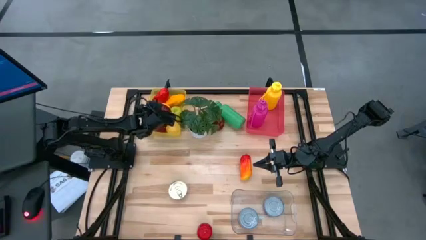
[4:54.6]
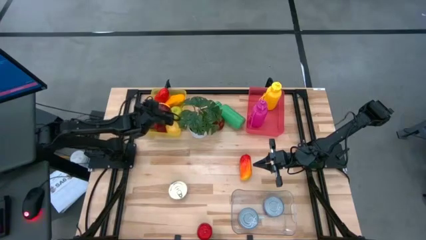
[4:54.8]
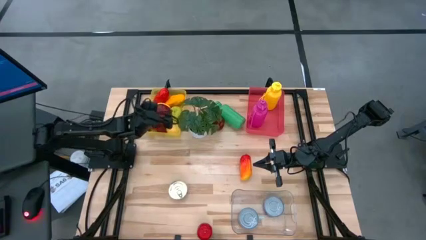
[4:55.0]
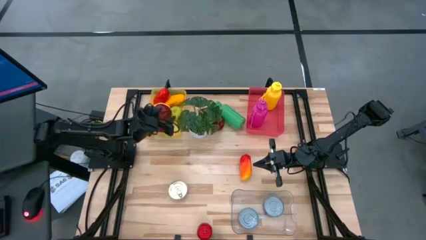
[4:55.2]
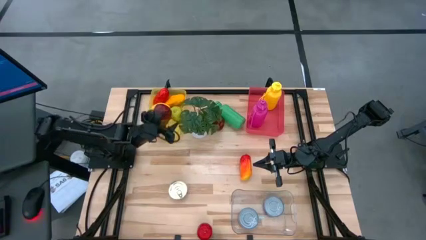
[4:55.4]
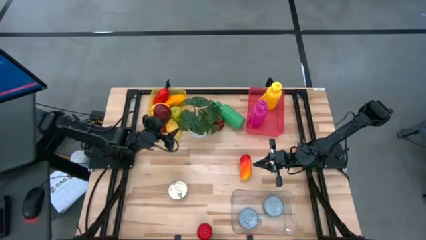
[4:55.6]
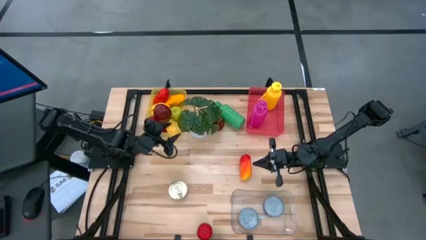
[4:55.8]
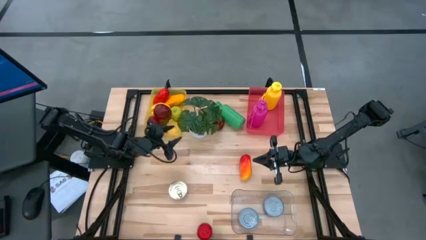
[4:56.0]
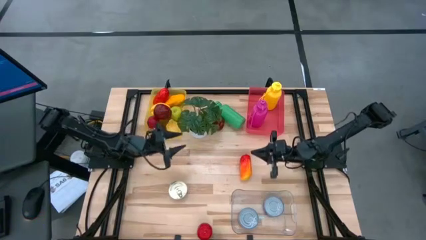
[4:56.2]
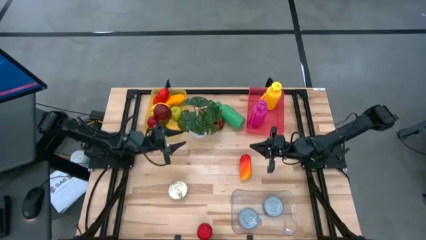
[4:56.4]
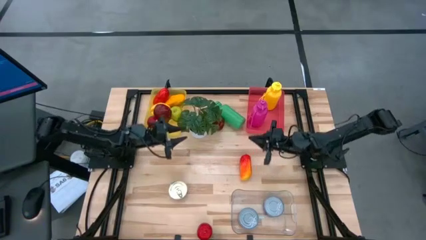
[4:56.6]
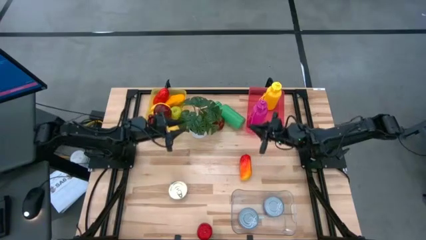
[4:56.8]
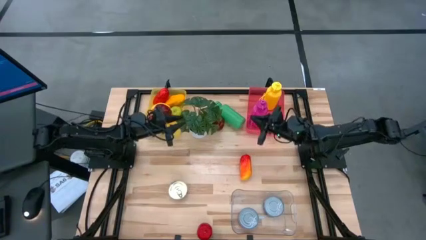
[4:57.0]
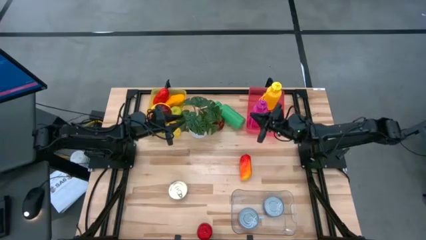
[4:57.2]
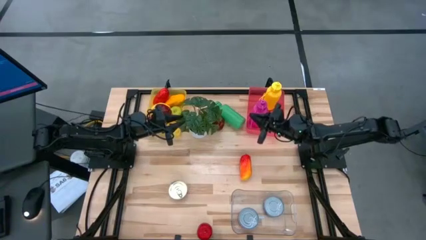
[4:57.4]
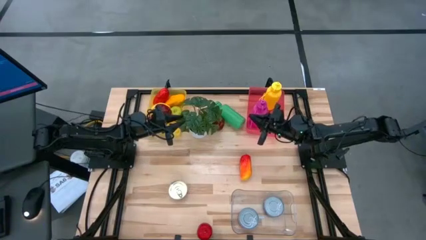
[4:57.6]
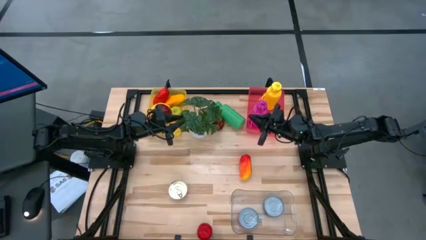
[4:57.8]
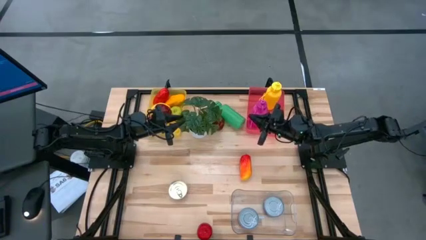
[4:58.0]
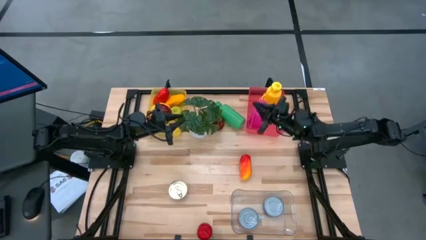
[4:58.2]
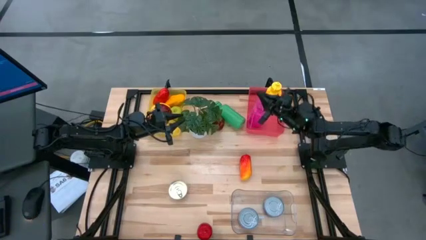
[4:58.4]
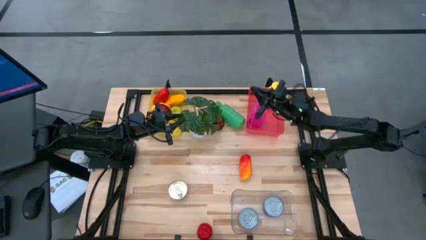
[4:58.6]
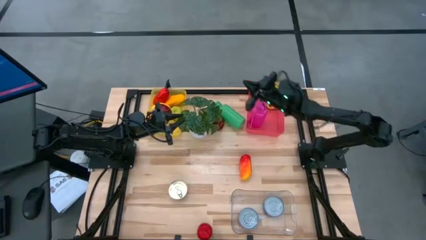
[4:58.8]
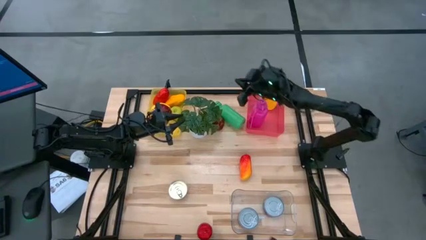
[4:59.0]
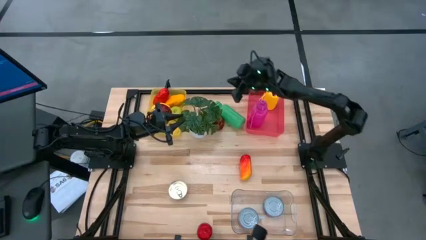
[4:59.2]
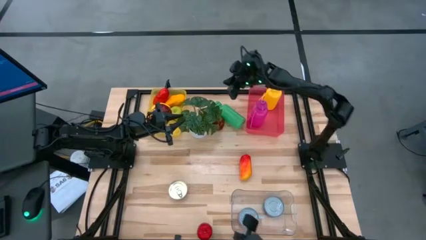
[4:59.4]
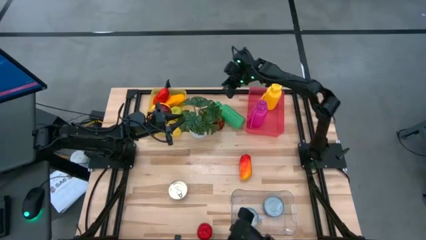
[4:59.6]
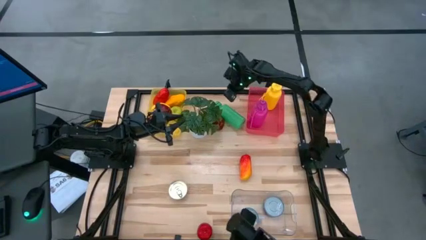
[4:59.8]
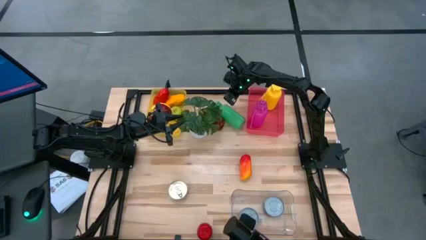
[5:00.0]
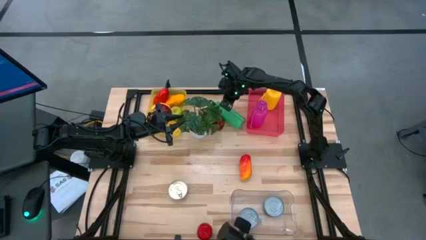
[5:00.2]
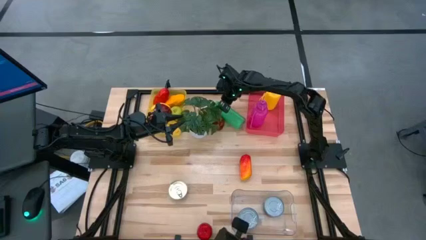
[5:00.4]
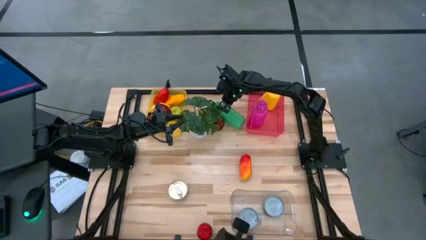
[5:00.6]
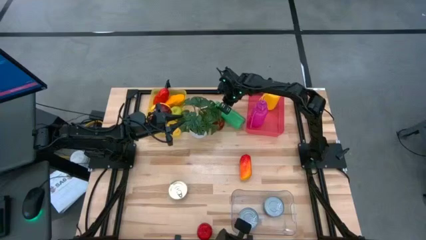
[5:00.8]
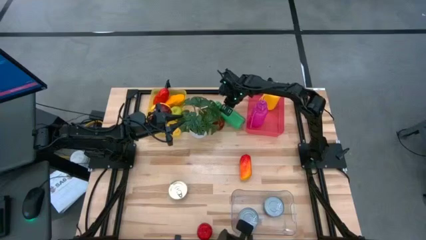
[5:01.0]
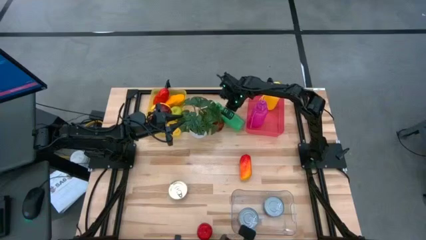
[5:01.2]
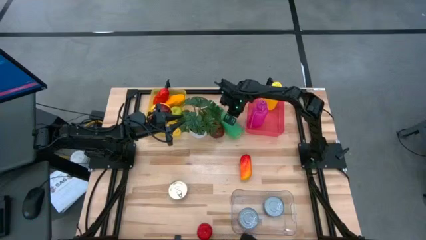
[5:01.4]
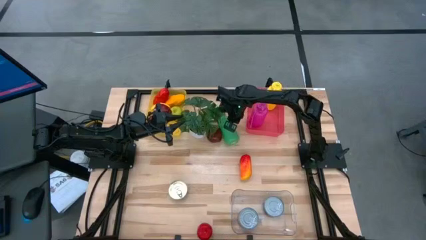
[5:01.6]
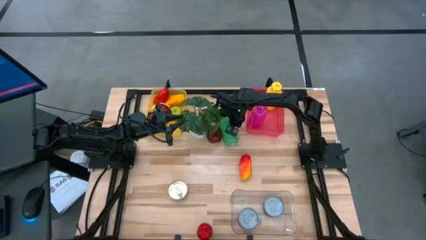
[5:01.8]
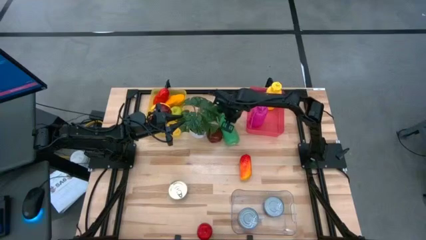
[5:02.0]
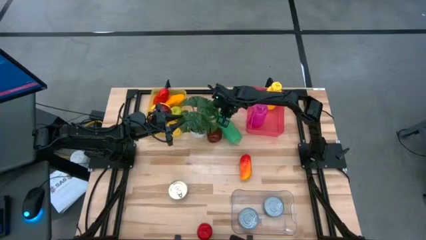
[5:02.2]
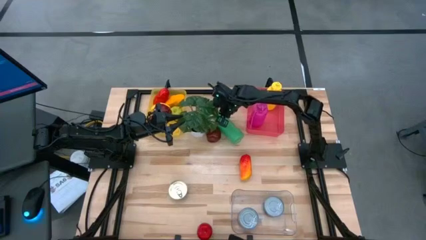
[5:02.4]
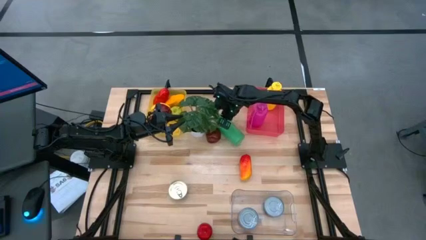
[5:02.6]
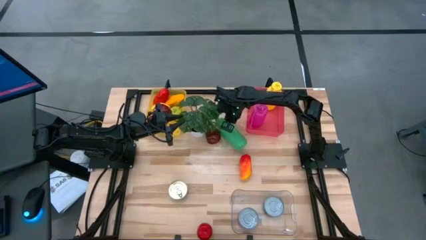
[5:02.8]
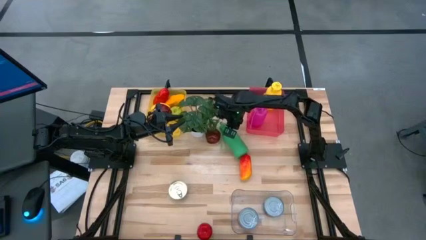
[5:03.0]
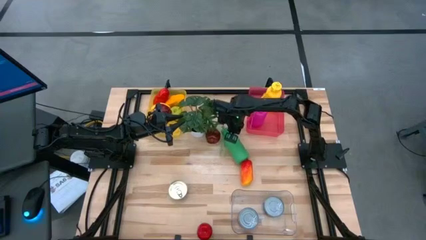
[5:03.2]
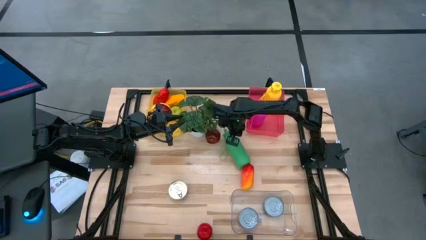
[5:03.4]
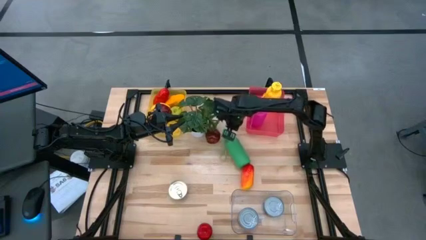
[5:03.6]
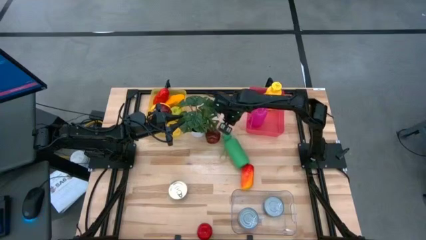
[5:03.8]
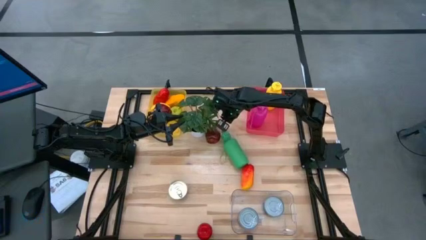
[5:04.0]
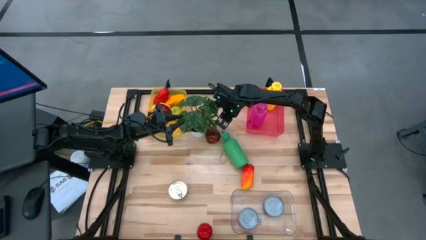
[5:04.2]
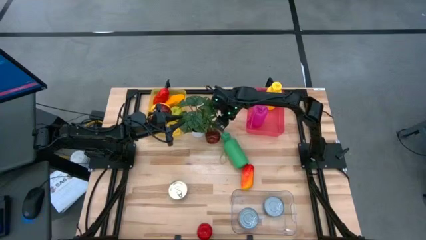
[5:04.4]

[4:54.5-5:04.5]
Task: Pick & Place Food Item
Put the green water bottle into the pink bin

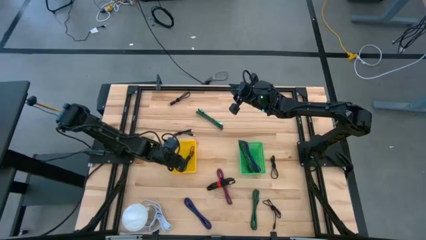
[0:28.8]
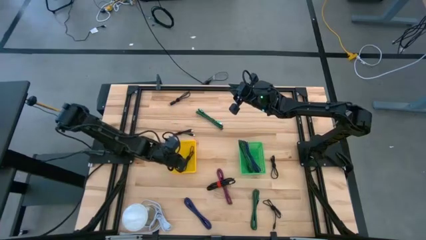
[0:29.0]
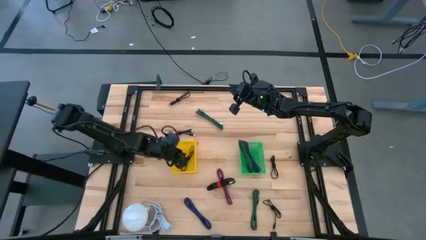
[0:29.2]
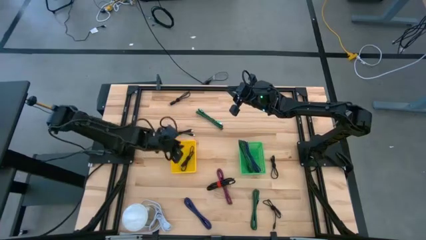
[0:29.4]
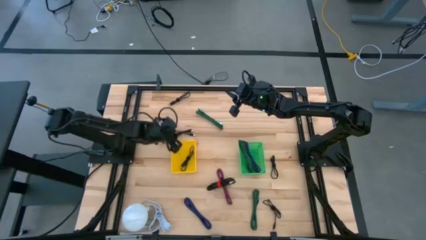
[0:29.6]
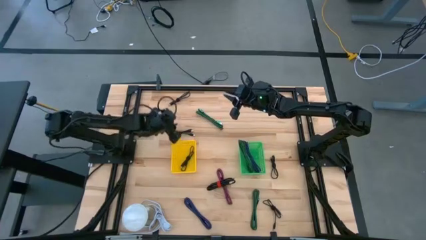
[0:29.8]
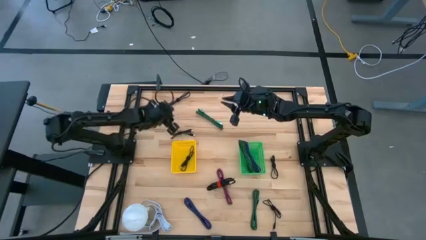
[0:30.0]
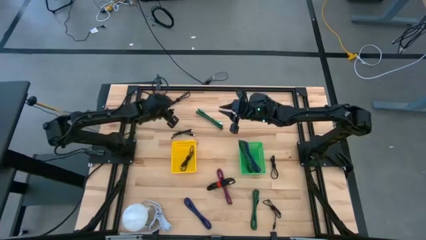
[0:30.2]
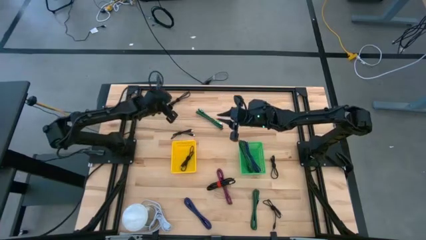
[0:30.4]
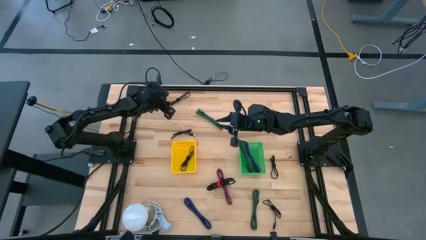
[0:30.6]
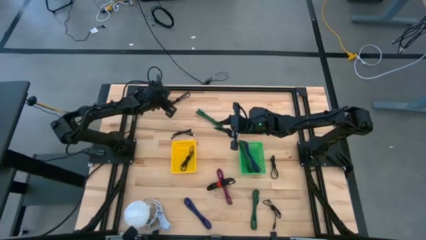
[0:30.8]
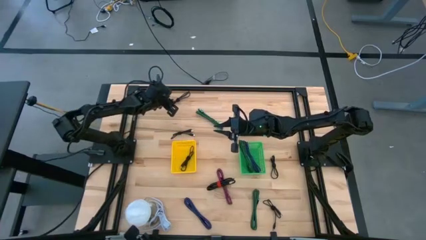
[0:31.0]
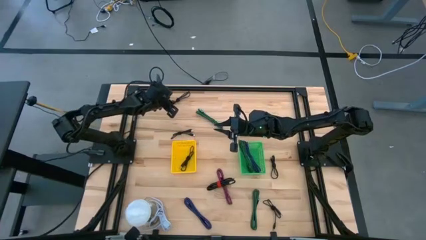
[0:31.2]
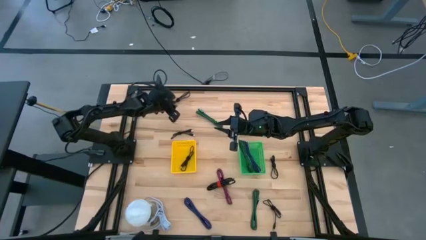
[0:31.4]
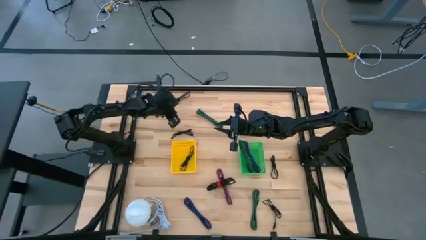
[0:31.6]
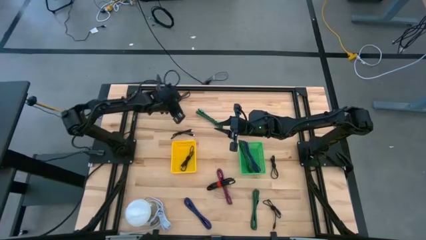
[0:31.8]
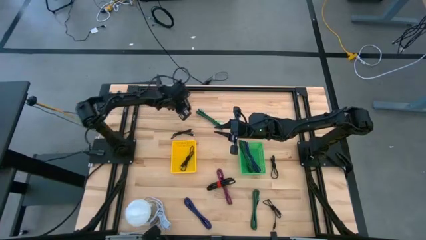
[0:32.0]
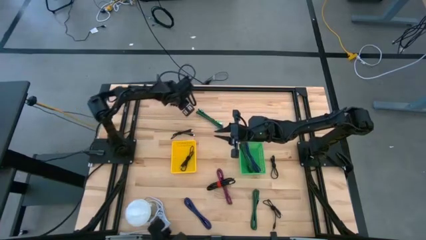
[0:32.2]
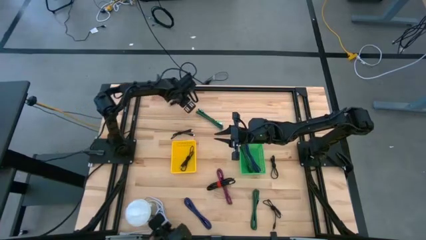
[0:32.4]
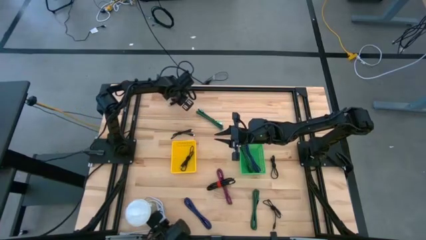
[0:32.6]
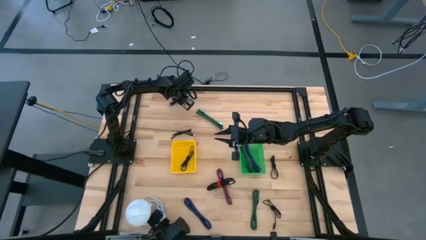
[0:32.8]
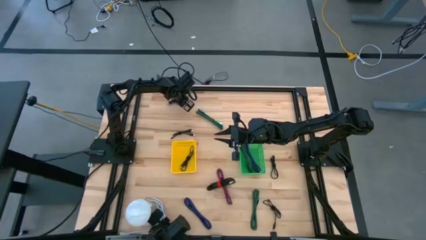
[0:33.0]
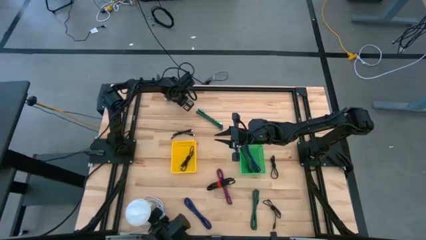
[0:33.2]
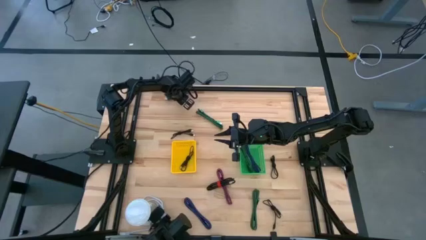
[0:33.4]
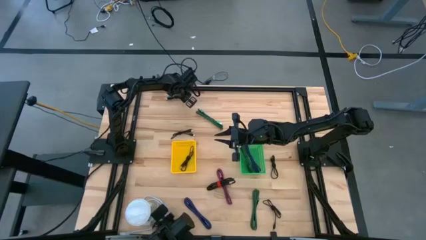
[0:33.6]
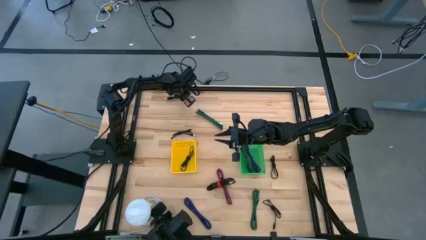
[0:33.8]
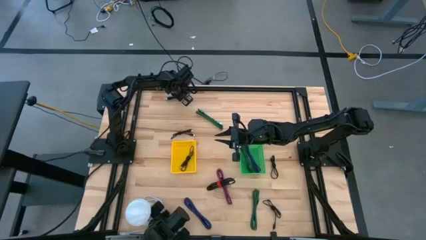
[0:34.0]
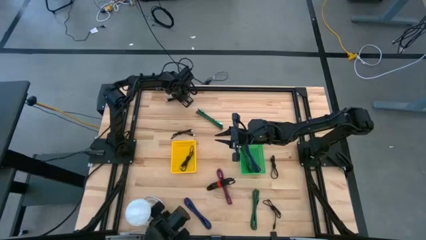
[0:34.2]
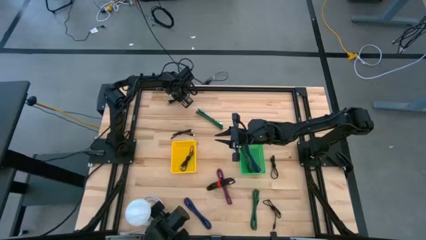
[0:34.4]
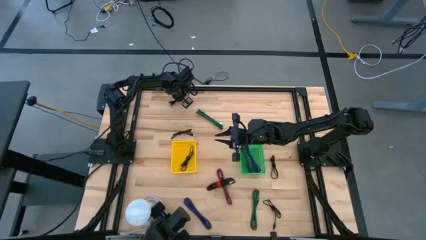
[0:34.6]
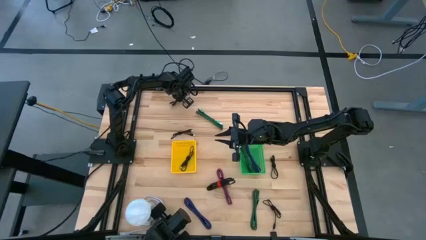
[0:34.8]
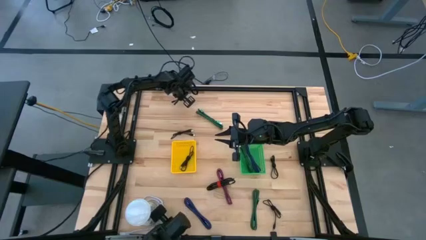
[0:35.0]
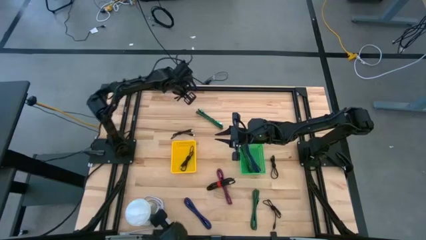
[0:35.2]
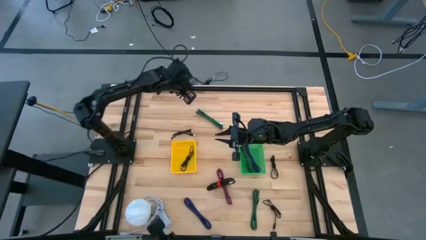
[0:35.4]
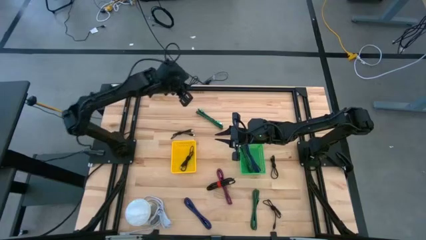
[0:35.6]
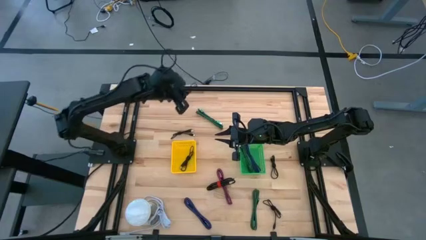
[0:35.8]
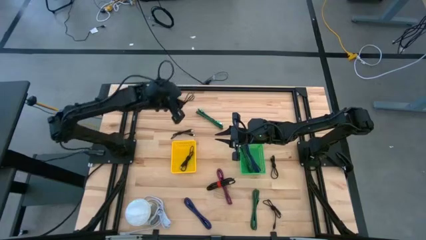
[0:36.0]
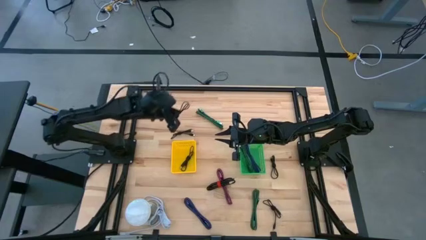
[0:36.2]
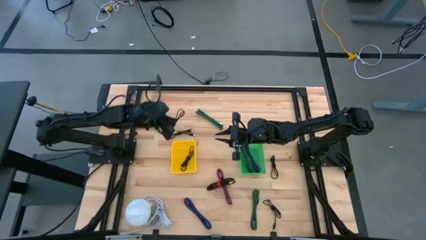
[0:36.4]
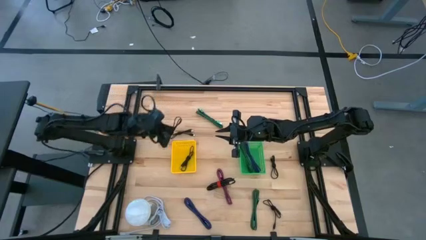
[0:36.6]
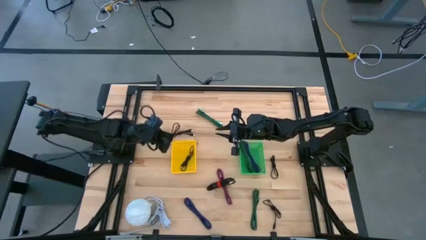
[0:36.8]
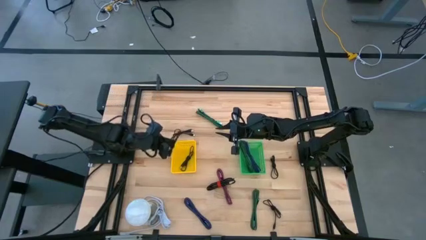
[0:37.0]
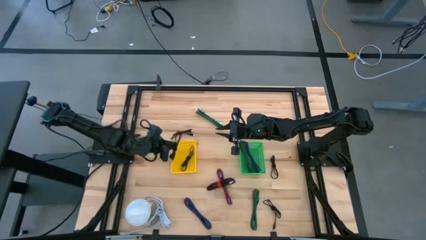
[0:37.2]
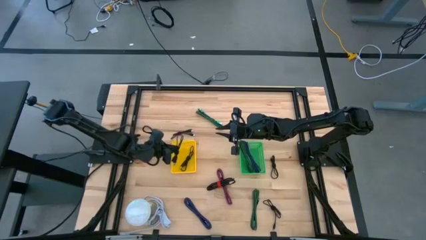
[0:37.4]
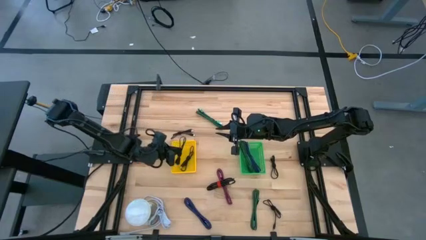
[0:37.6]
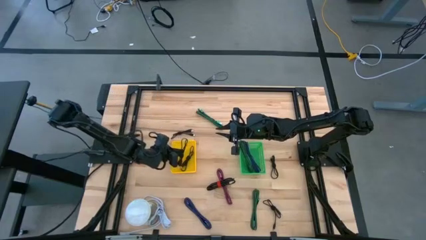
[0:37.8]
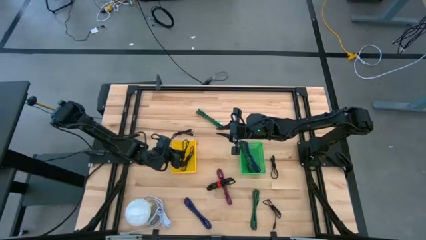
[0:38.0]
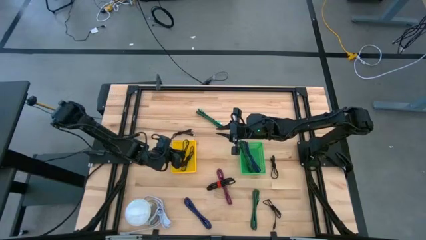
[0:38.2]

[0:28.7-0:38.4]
Task: Pick & Place USB Port
Put the black charger cable into the yellow bin
